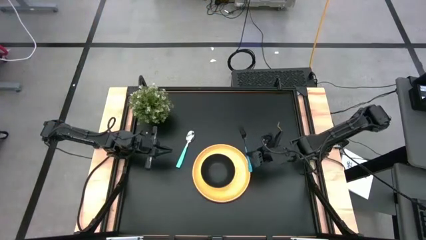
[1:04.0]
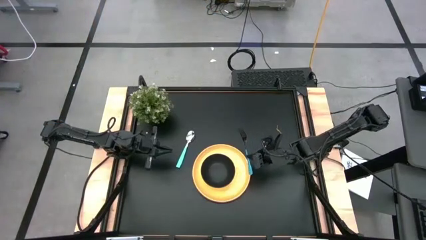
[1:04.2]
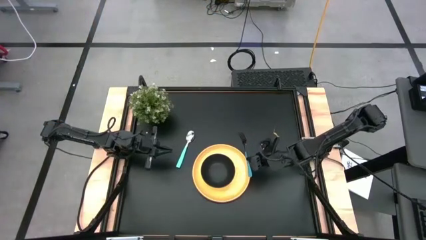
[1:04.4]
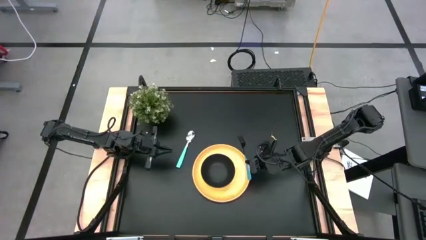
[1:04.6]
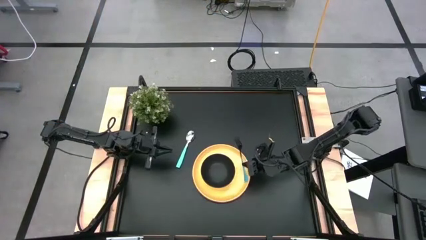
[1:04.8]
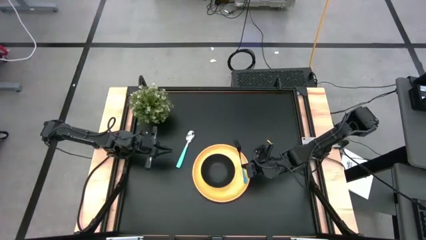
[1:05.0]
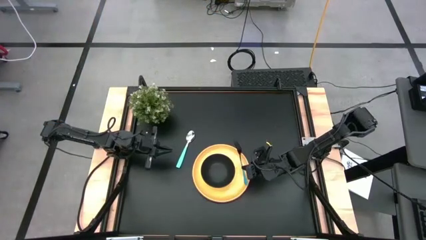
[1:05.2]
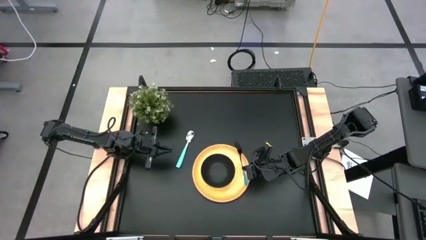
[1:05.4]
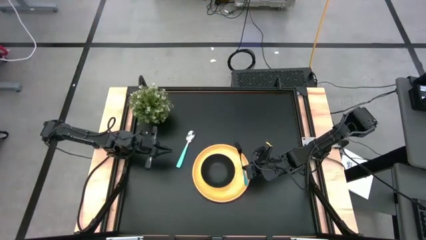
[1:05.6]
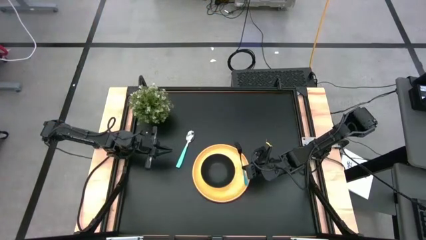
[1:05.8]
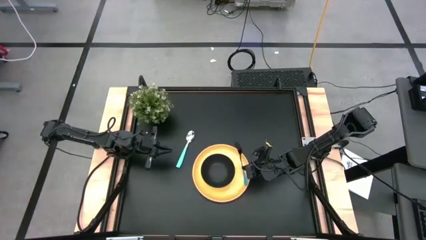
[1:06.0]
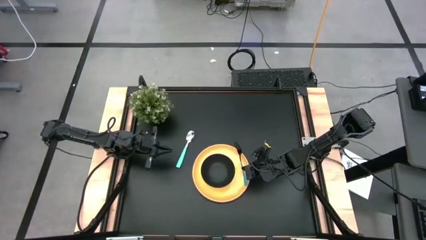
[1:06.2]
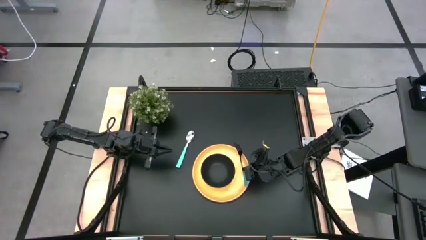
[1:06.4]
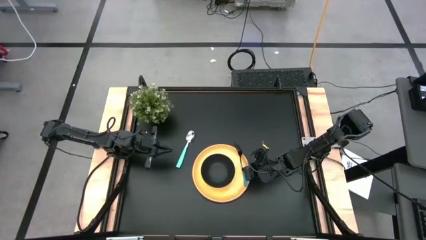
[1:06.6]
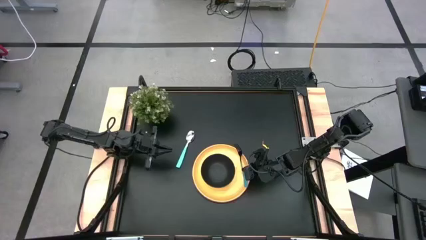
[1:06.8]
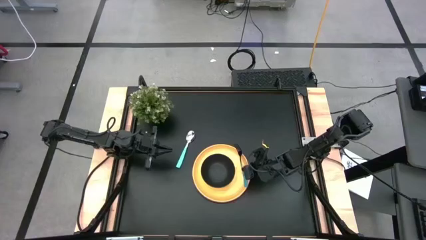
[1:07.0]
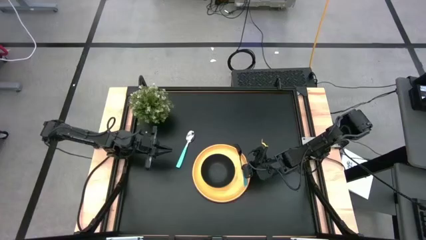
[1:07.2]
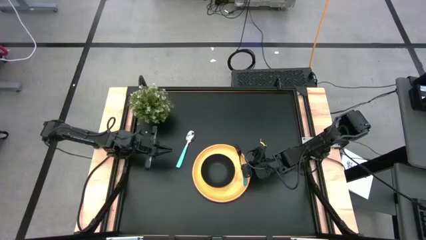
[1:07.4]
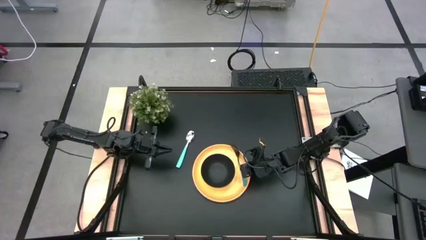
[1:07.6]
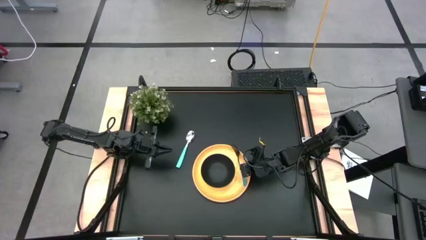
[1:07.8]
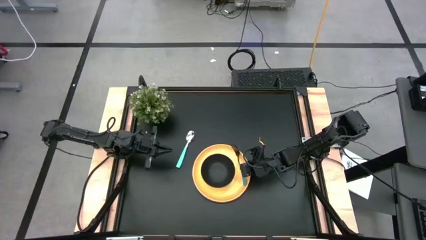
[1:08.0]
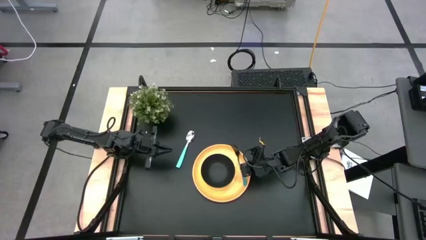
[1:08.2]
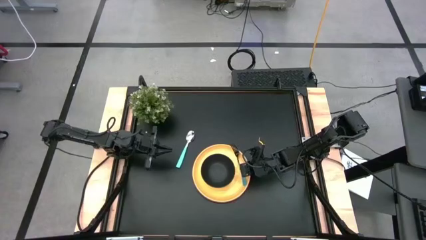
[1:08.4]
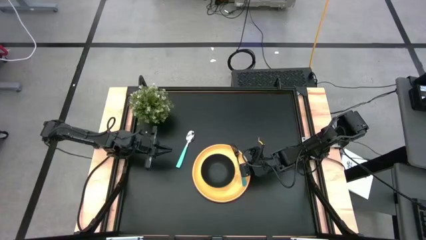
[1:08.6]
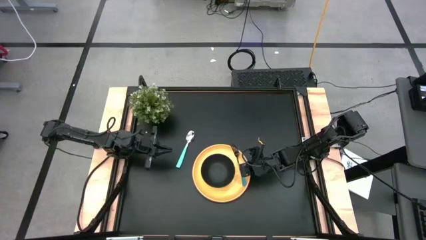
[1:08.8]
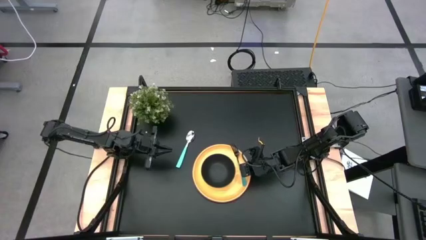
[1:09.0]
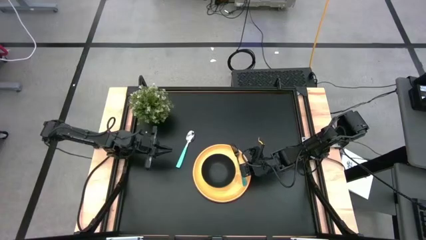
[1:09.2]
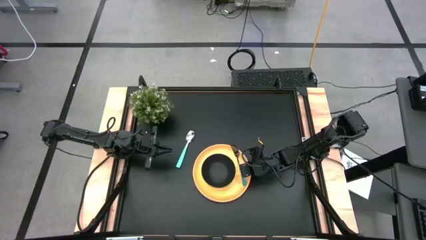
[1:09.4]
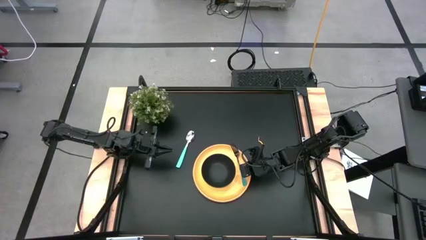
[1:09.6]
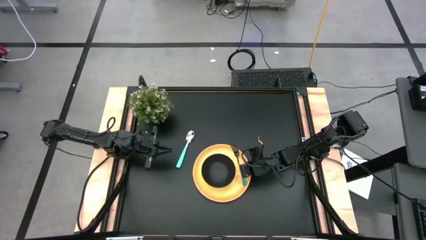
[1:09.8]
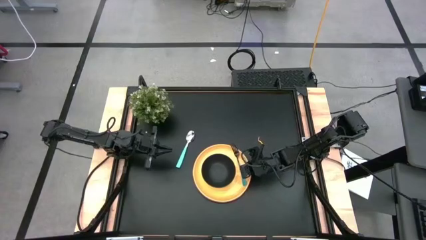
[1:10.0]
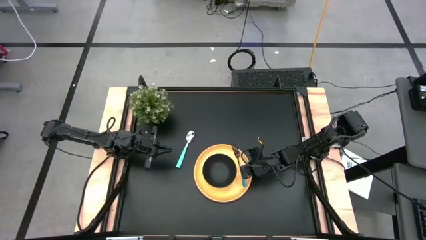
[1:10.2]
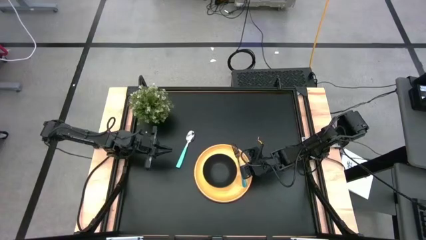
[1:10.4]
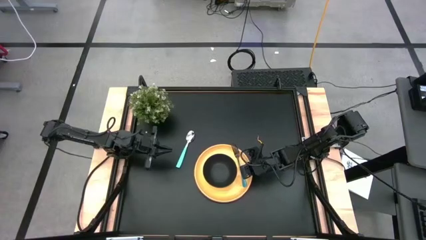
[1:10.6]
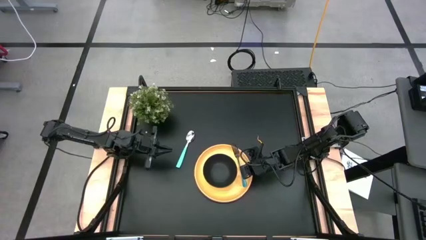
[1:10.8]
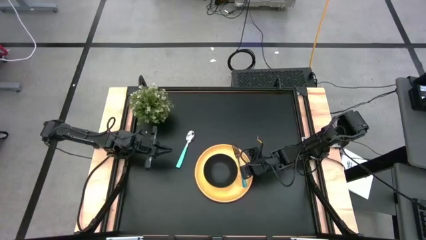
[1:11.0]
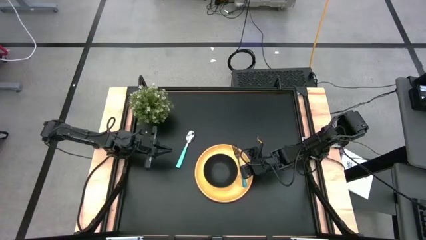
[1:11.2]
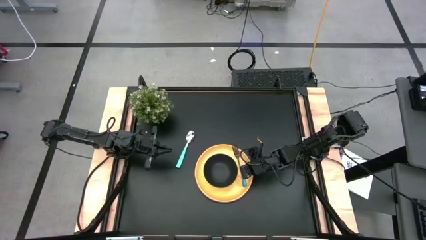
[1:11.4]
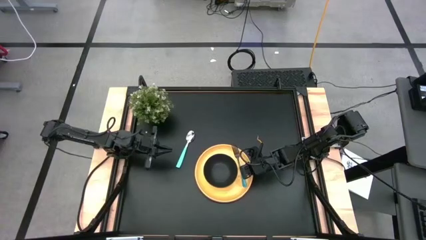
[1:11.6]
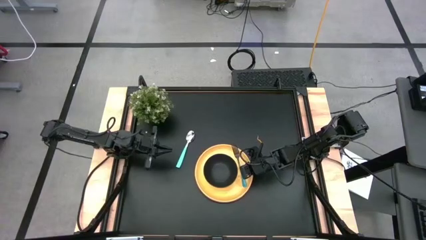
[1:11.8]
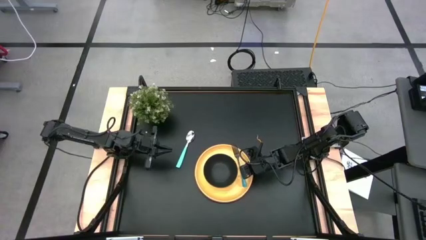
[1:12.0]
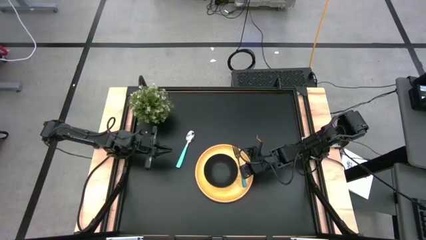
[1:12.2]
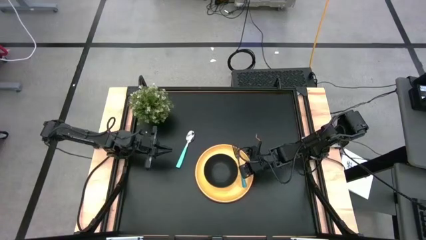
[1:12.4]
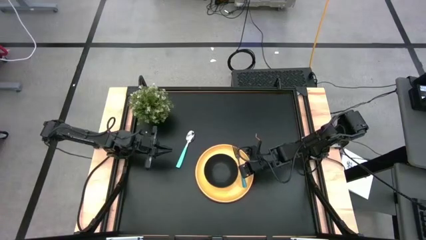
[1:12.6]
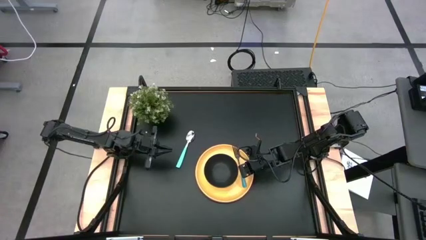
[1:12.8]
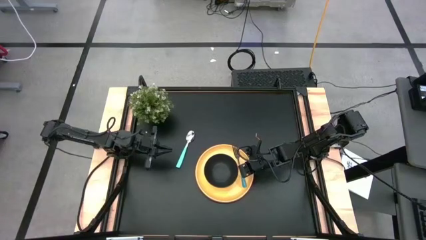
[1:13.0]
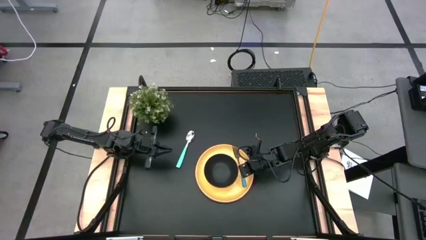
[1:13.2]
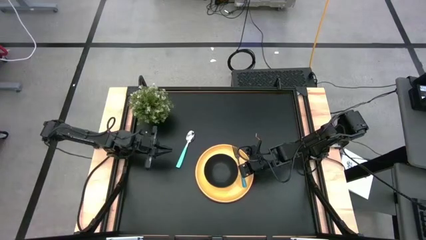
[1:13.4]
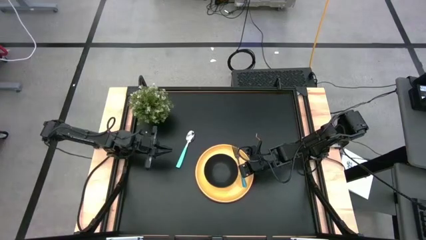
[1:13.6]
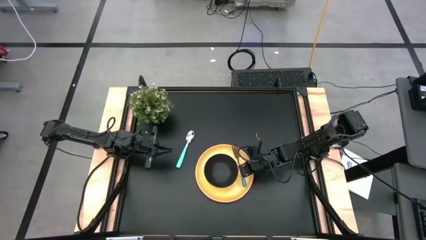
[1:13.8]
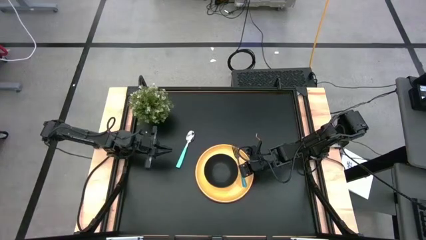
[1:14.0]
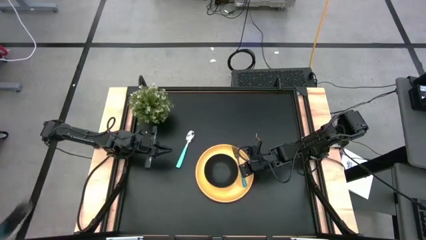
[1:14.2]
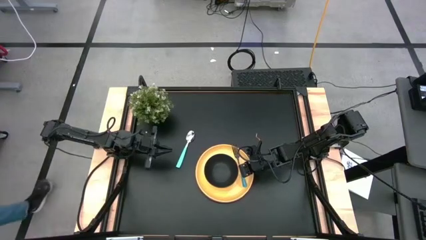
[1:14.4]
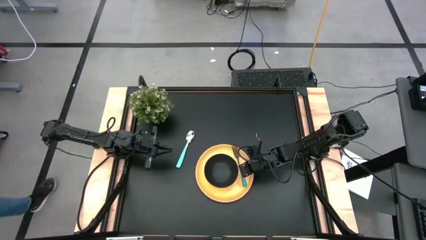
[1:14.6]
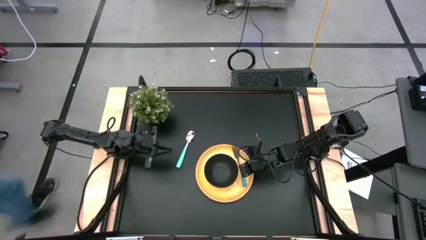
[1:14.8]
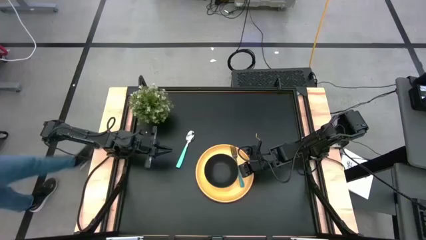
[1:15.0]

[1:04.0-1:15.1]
Task: Set table place
Put the blue fork on the yellow plate to the right of the black bowl
